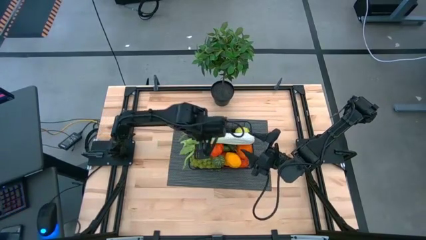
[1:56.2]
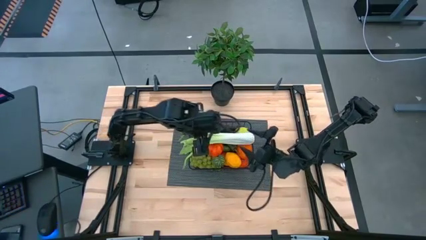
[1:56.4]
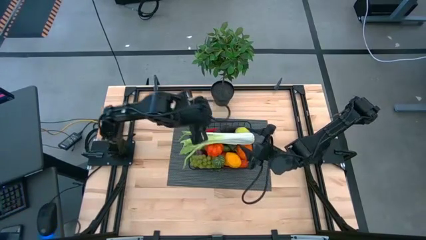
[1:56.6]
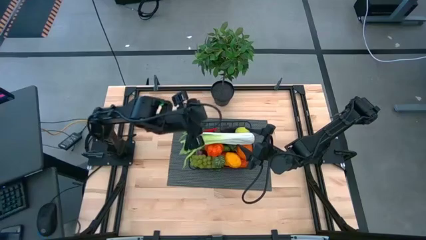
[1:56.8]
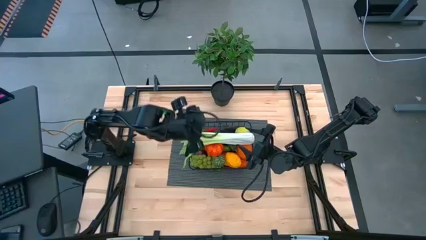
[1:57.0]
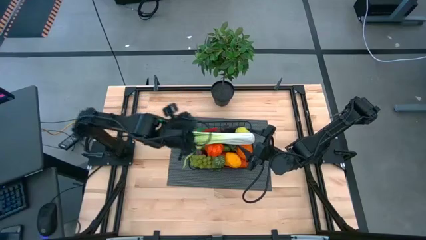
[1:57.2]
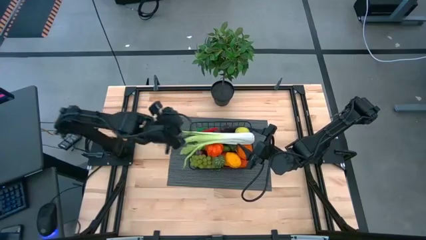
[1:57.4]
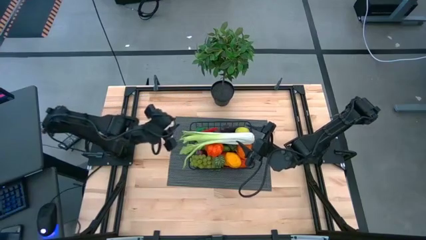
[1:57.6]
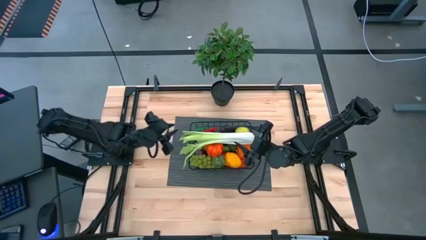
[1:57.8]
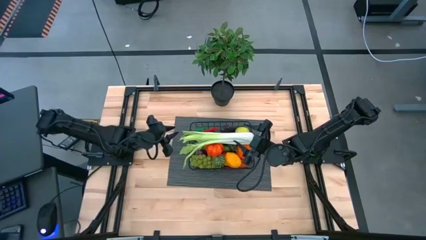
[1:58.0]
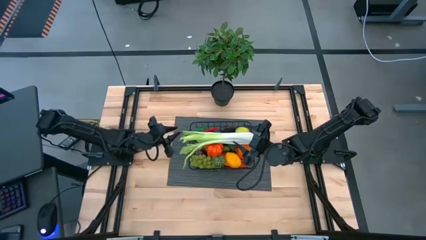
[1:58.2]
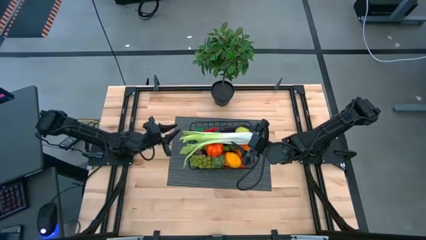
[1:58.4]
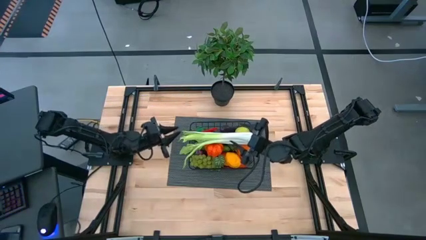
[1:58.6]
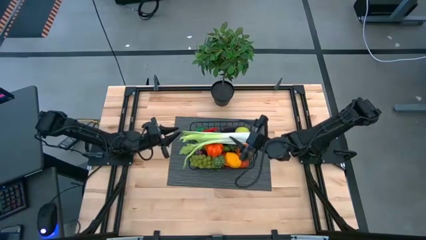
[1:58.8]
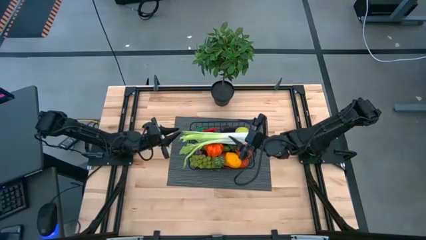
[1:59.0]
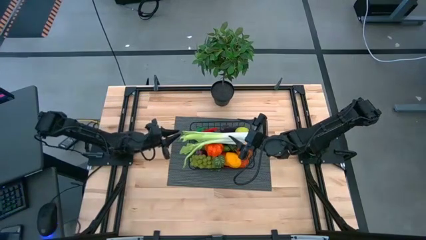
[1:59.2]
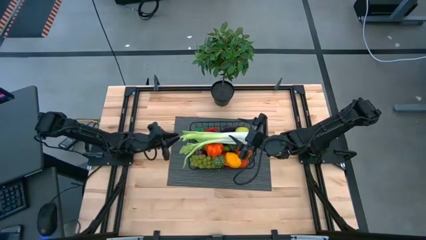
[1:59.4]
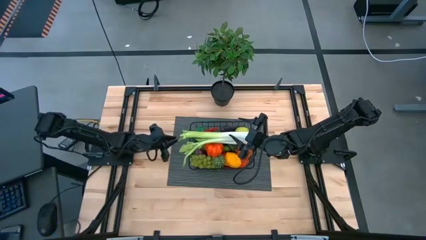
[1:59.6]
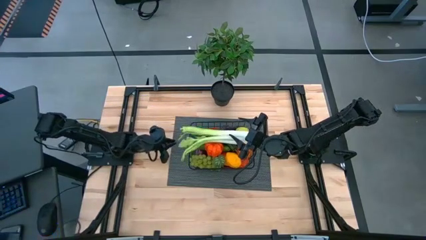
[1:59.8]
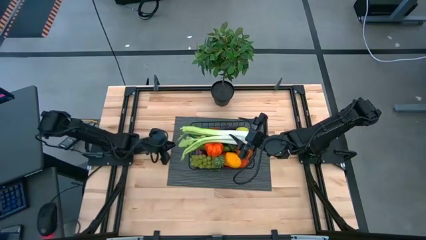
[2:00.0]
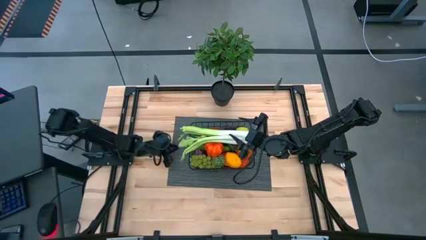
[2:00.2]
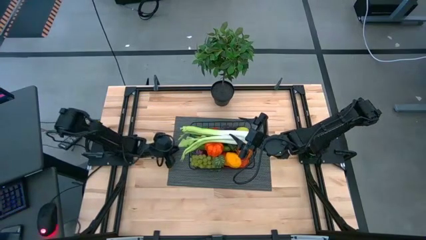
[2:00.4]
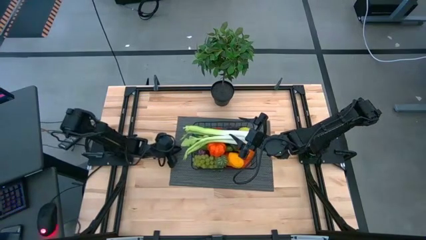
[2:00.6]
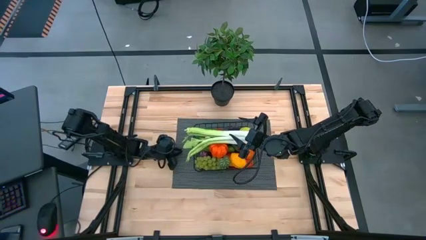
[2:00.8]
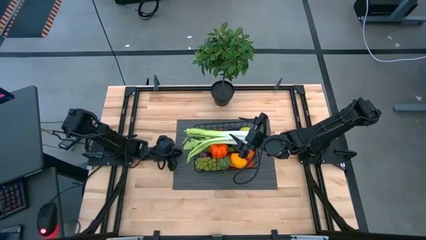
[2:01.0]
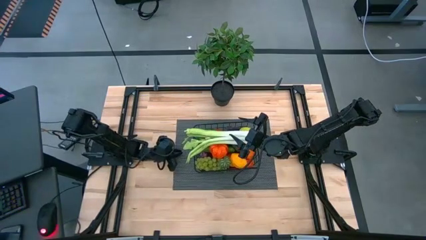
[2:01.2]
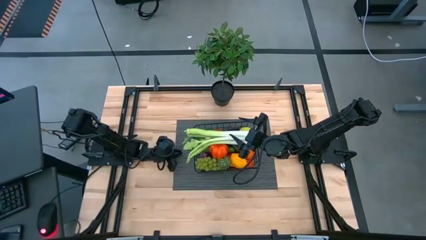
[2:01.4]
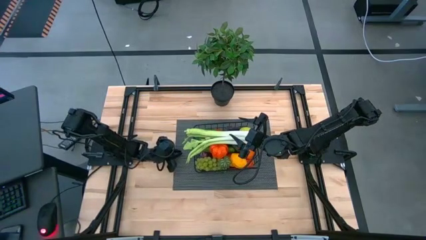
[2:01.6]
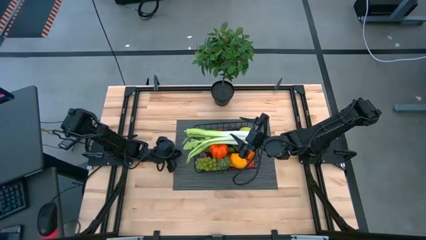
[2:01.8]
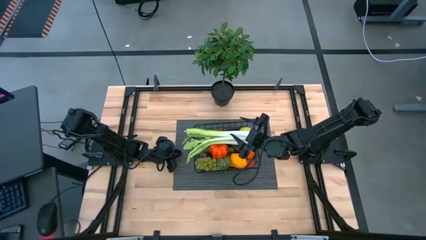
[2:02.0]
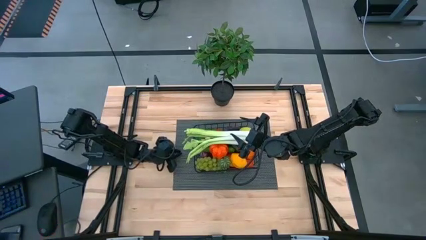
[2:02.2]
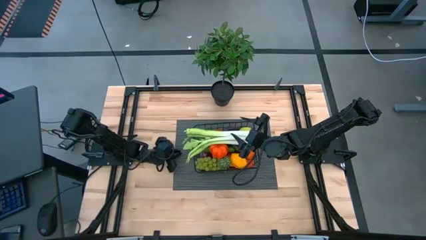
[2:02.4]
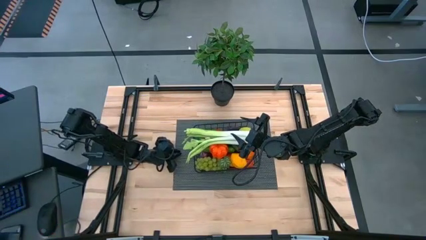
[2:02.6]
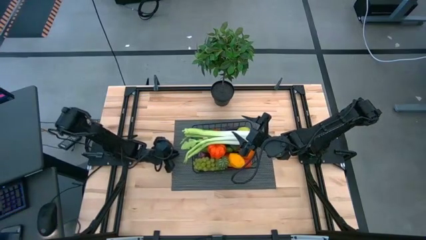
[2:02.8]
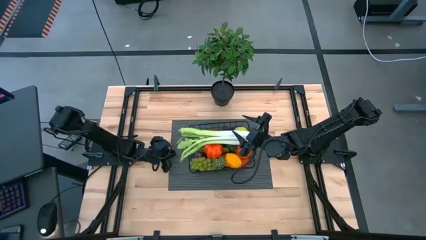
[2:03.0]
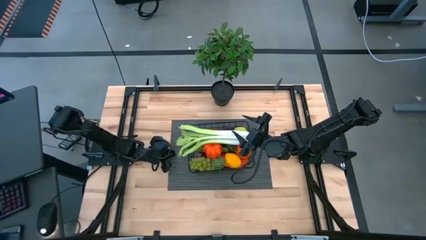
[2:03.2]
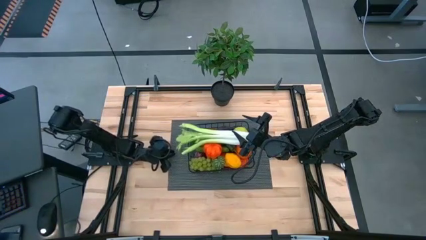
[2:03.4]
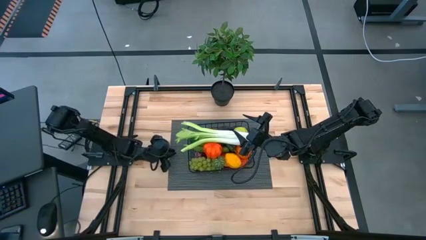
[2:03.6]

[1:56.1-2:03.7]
Task: Build produce basket
Adjust the mat

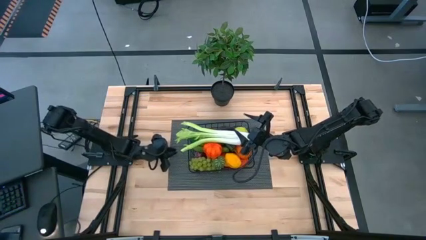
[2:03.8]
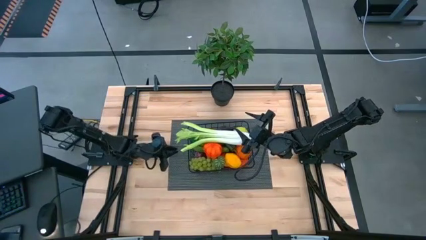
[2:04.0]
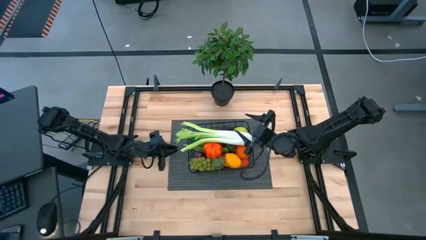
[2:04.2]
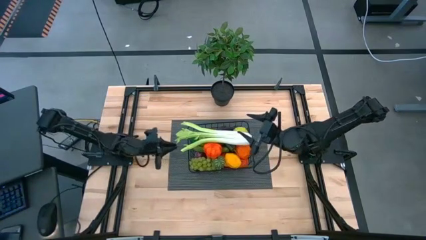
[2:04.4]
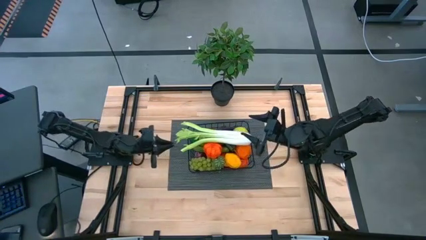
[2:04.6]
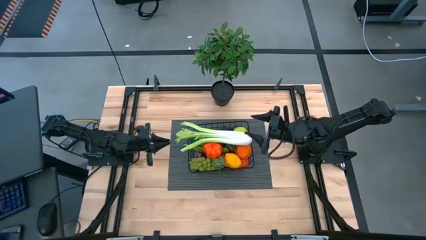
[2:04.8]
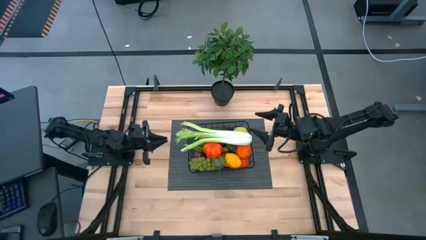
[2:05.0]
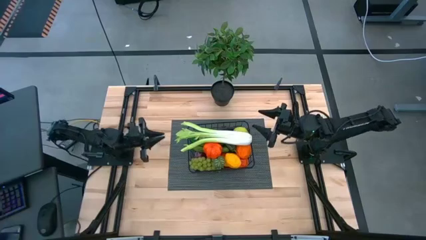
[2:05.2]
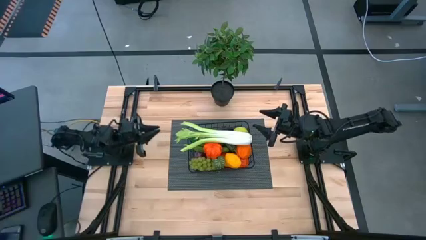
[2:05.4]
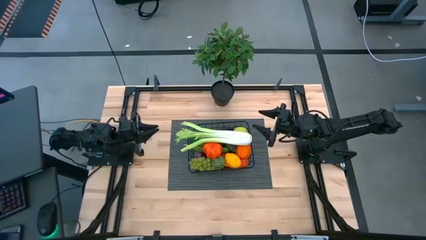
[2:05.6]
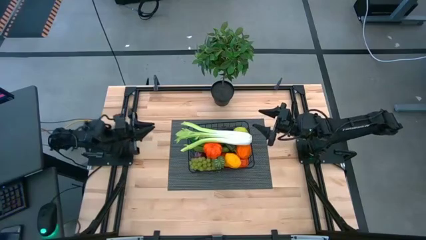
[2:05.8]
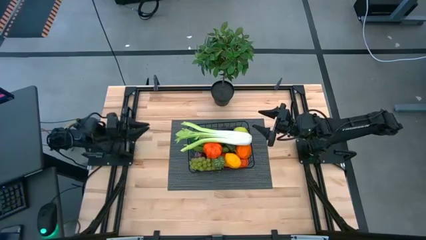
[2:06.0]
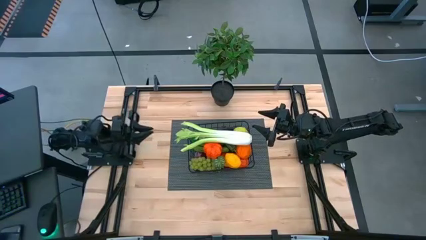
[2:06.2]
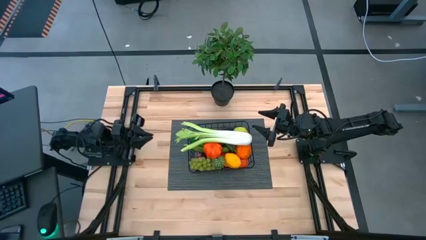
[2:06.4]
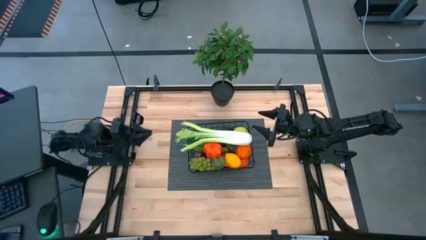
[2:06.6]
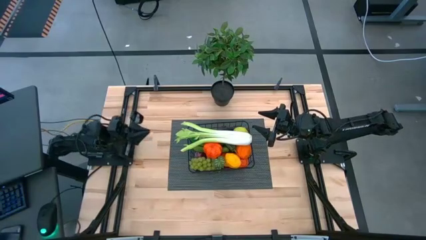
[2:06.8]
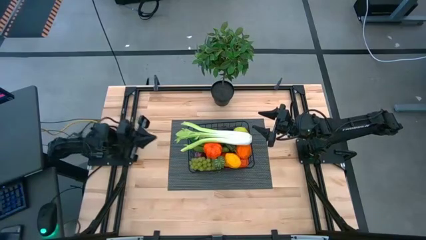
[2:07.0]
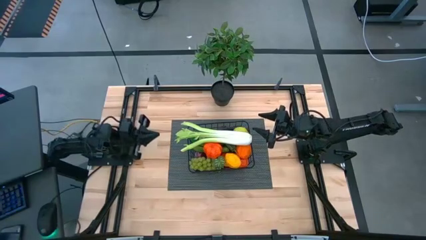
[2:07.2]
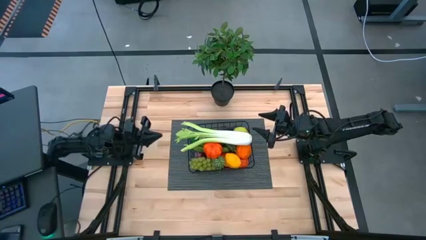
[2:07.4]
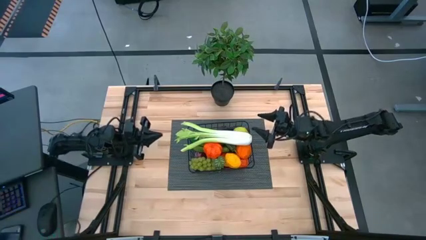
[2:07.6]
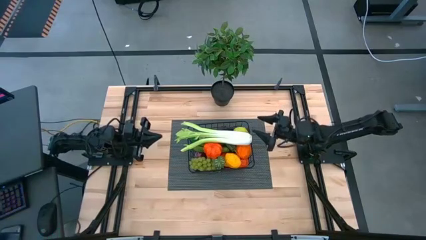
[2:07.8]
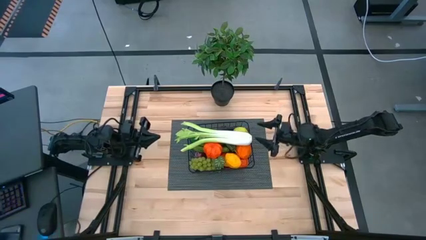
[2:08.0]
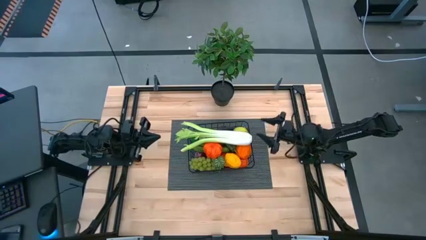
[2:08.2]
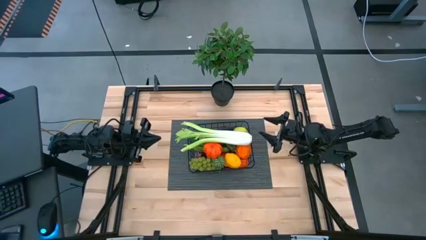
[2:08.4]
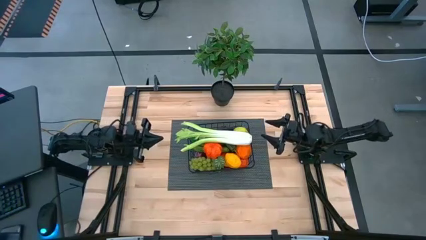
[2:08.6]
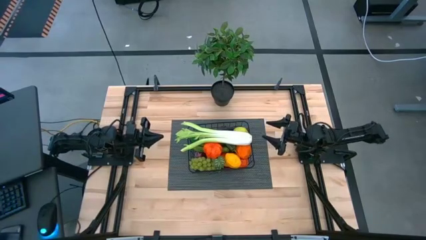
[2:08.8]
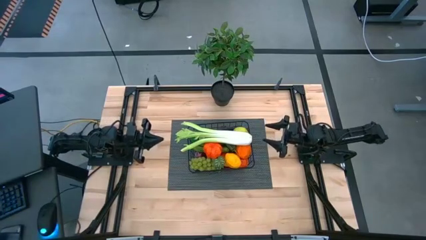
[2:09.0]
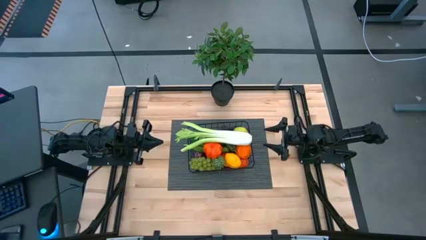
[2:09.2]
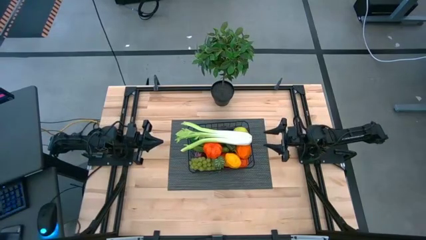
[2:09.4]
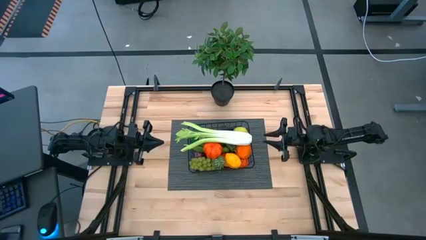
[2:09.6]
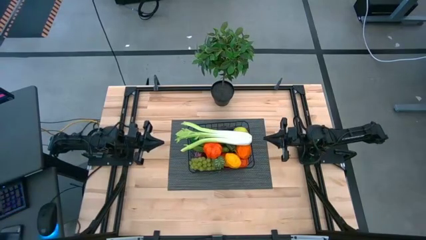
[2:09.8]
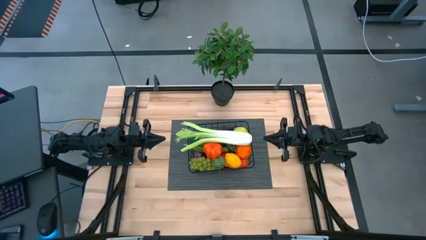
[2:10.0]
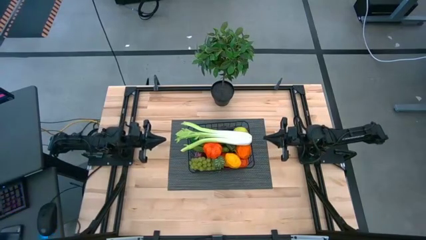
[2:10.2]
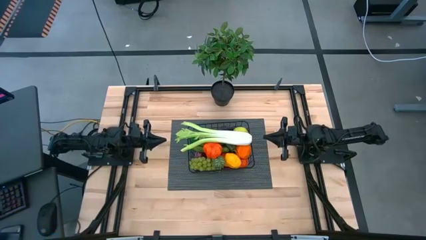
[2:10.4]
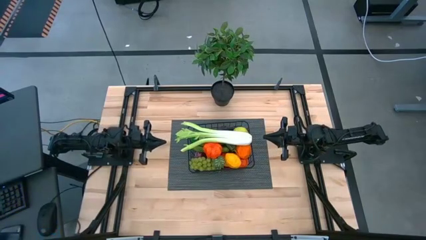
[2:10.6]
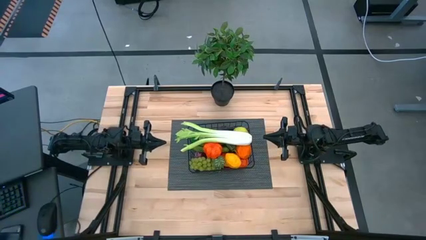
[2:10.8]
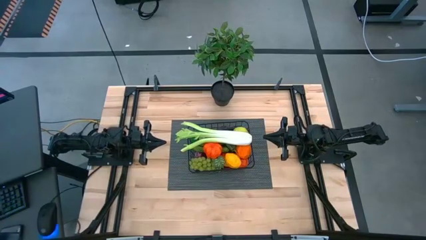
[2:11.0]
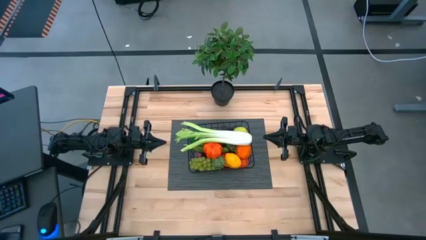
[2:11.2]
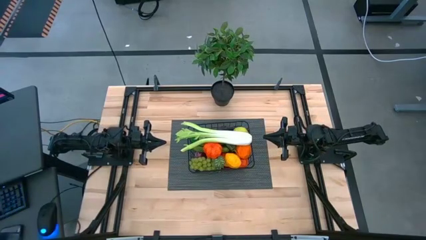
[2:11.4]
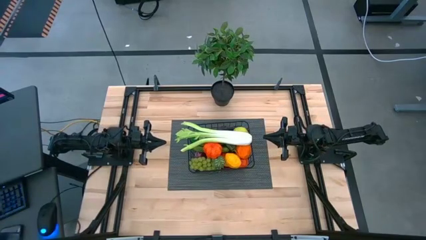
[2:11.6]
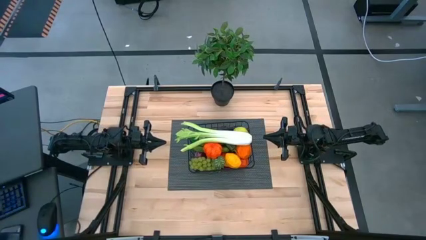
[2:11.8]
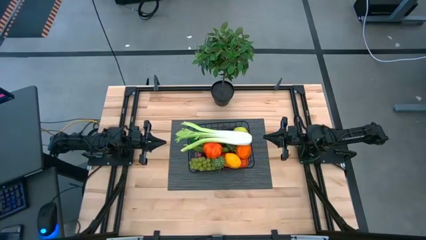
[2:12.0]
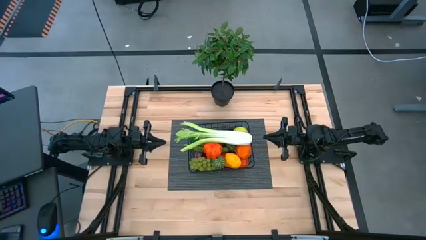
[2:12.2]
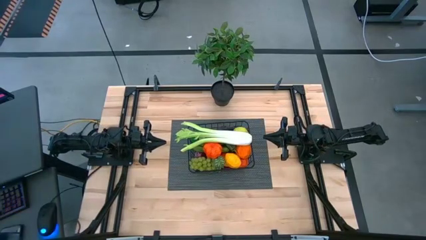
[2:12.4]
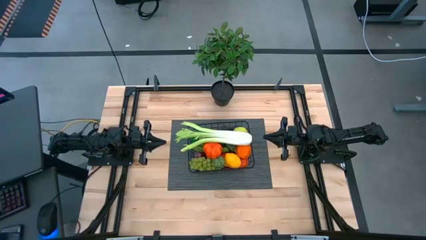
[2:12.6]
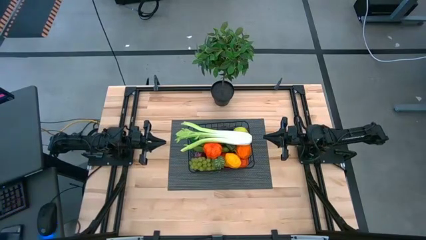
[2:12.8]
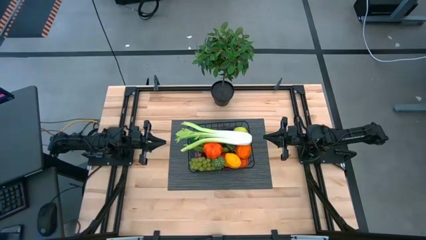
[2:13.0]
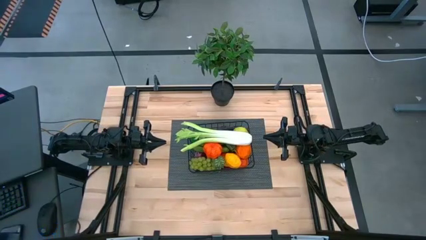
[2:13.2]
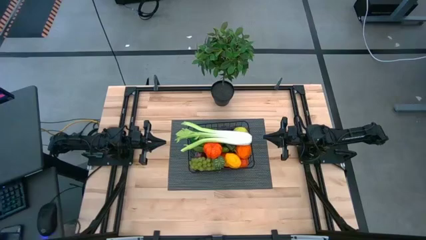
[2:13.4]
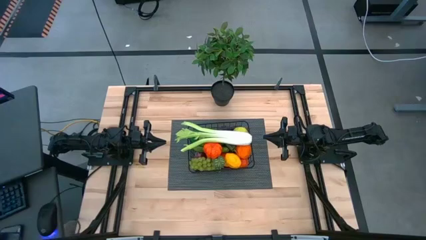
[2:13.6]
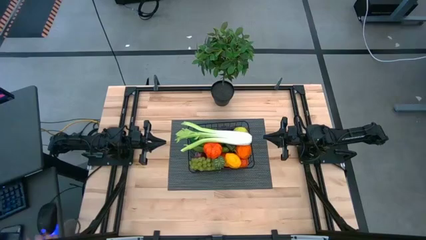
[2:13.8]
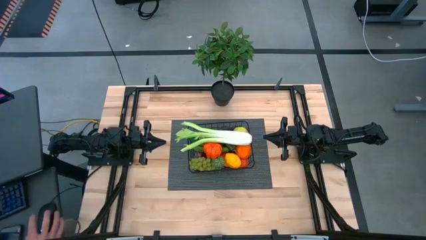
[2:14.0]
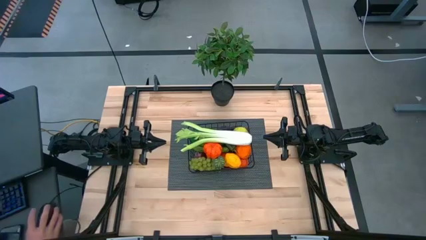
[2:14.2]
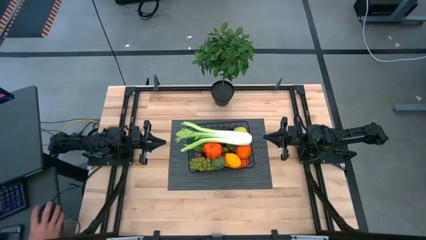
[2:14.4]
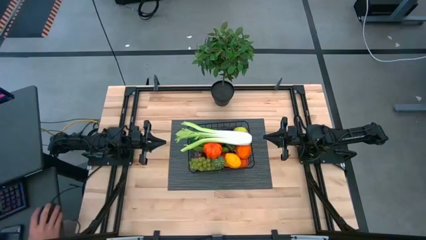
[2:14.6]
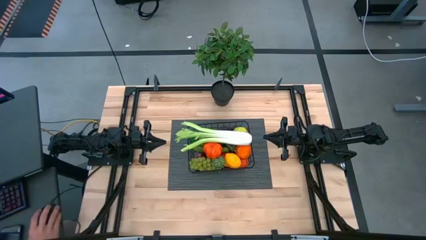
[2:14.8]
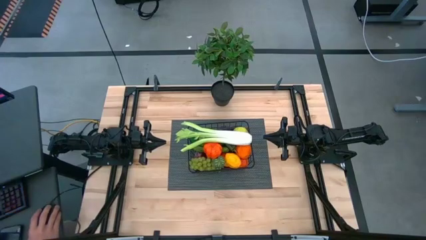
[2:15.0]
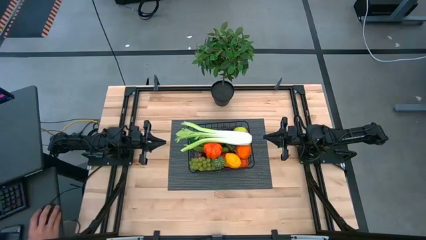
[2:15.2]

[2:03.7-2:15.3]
Return to Home Position
